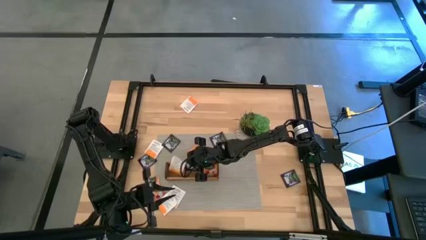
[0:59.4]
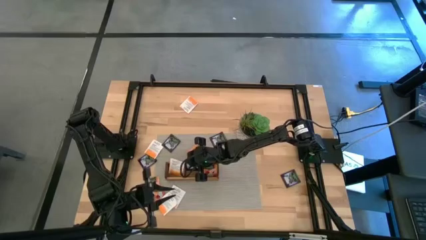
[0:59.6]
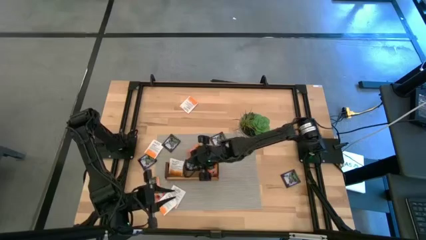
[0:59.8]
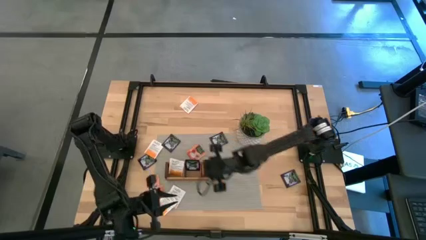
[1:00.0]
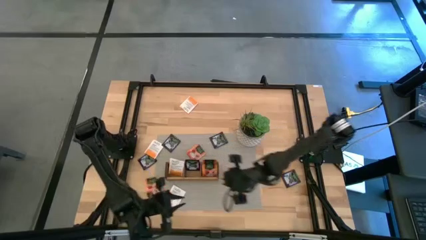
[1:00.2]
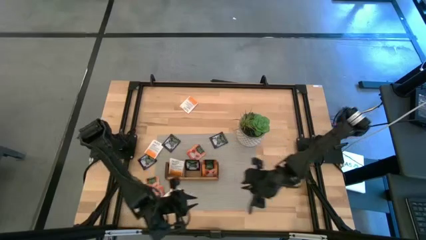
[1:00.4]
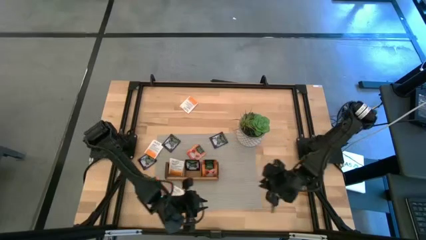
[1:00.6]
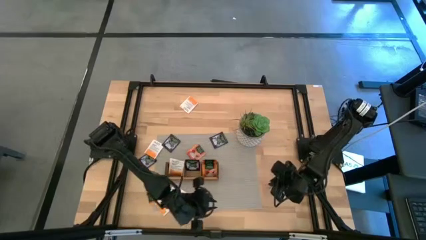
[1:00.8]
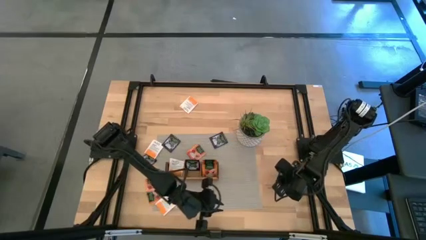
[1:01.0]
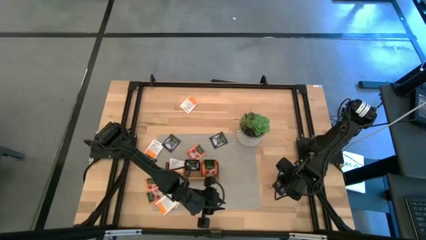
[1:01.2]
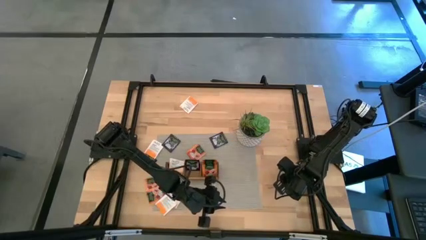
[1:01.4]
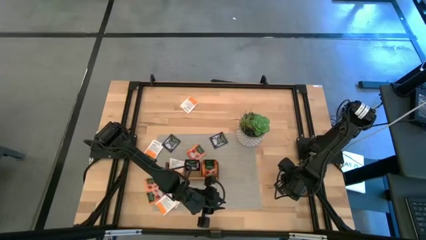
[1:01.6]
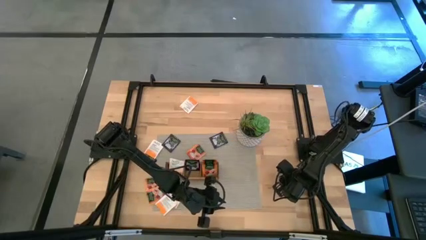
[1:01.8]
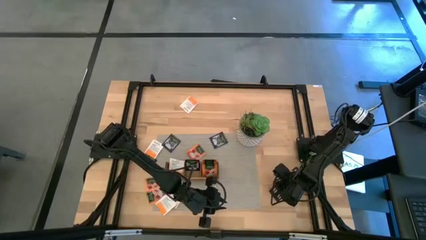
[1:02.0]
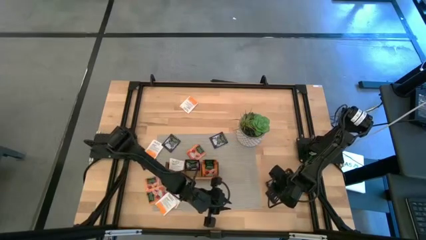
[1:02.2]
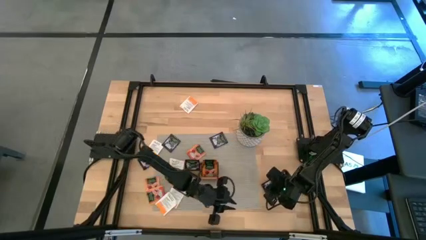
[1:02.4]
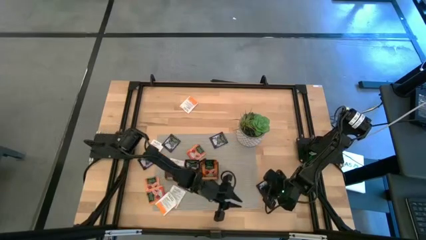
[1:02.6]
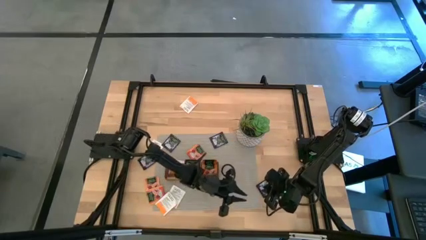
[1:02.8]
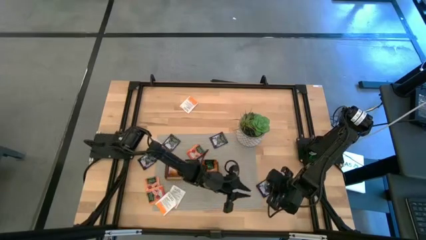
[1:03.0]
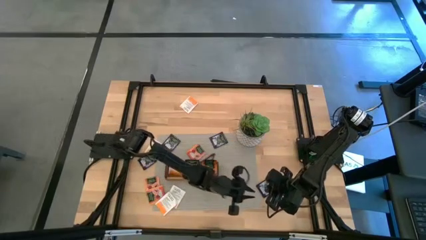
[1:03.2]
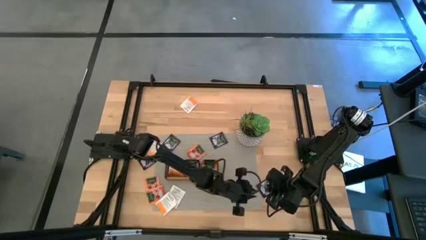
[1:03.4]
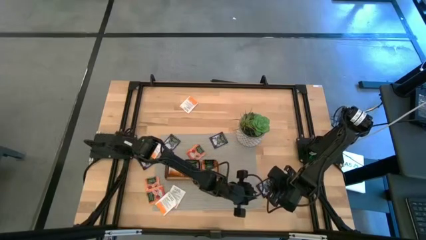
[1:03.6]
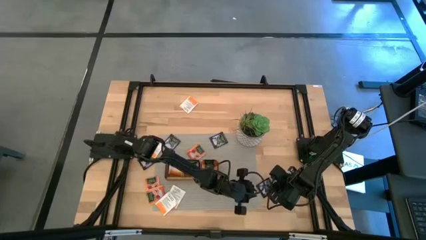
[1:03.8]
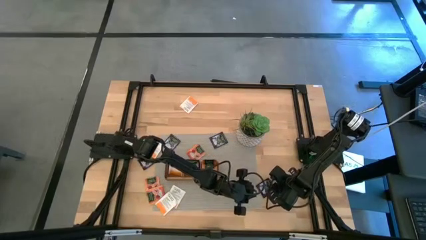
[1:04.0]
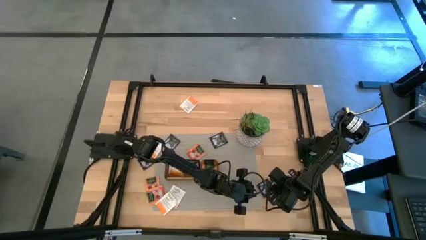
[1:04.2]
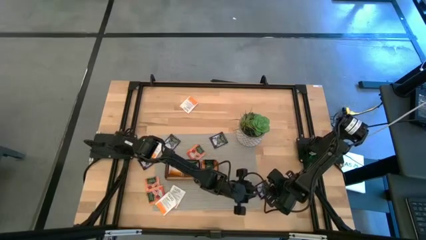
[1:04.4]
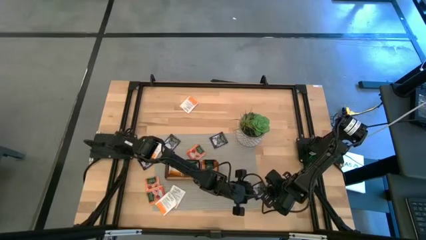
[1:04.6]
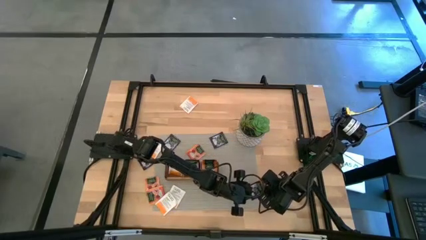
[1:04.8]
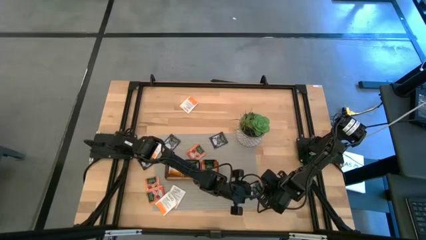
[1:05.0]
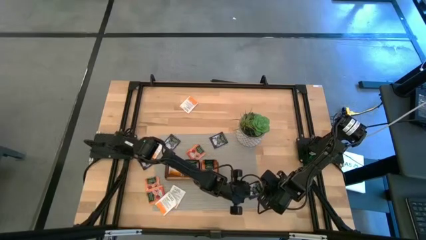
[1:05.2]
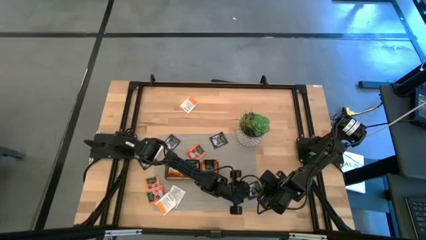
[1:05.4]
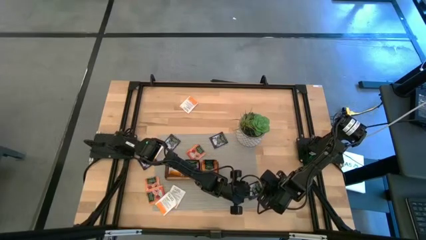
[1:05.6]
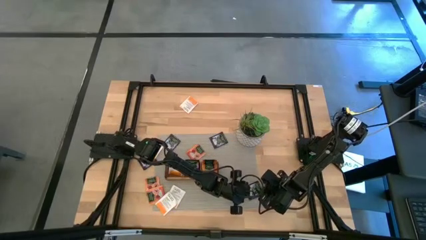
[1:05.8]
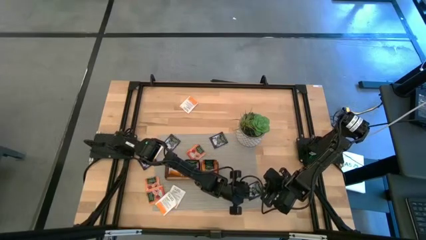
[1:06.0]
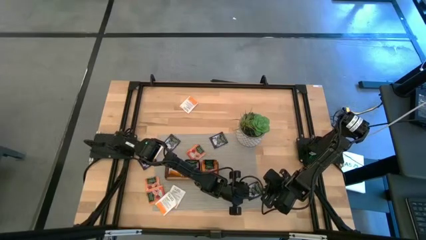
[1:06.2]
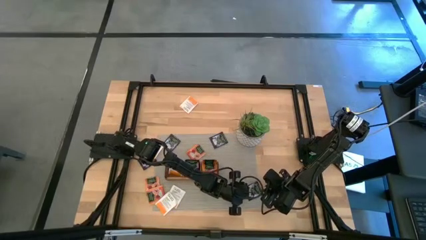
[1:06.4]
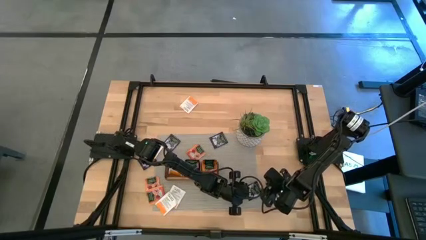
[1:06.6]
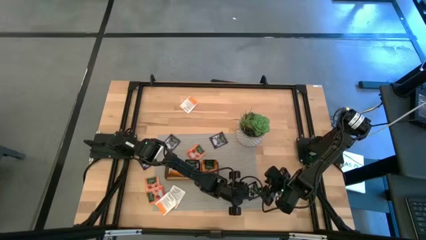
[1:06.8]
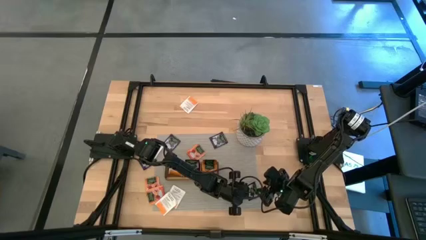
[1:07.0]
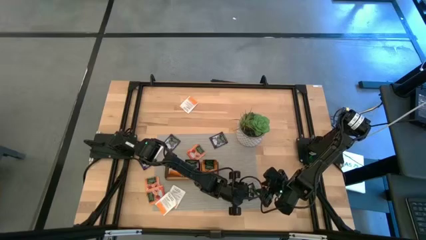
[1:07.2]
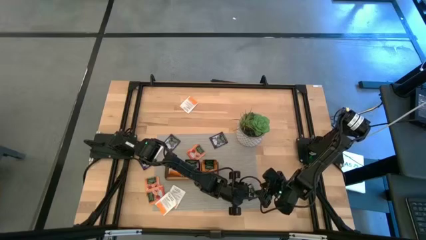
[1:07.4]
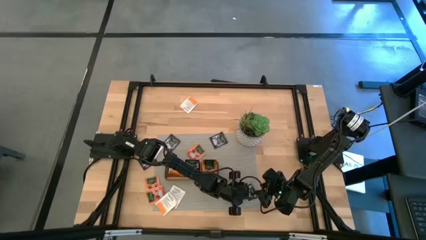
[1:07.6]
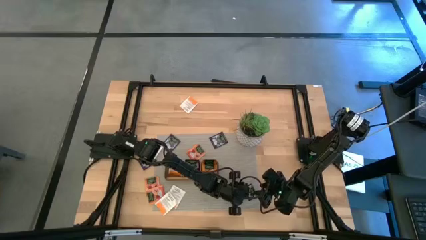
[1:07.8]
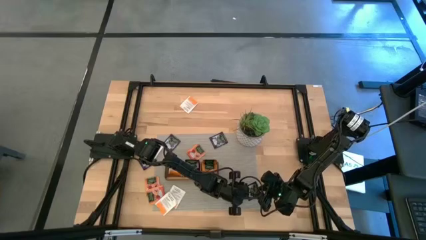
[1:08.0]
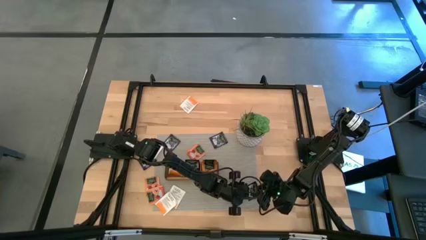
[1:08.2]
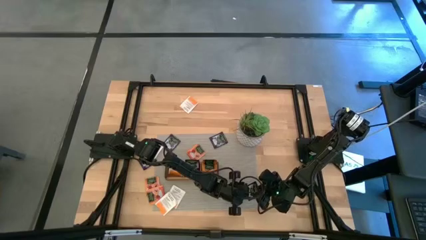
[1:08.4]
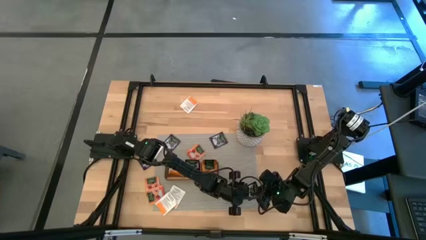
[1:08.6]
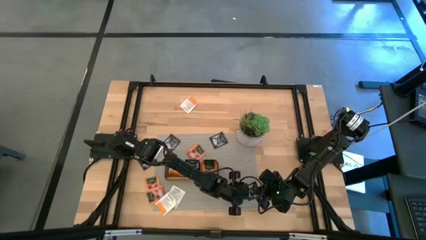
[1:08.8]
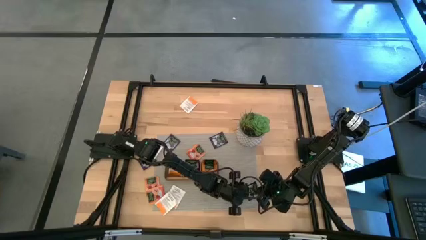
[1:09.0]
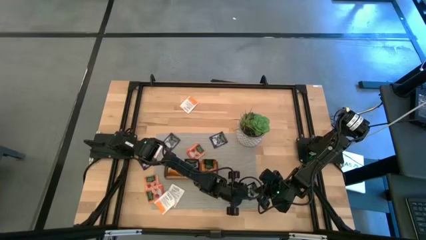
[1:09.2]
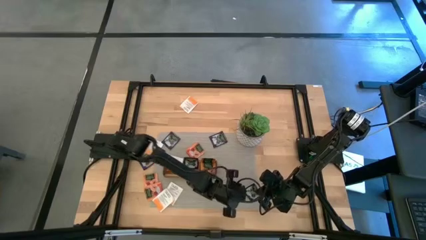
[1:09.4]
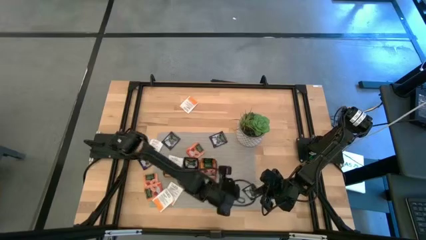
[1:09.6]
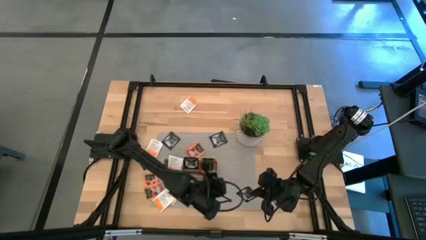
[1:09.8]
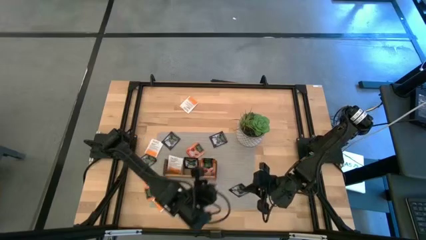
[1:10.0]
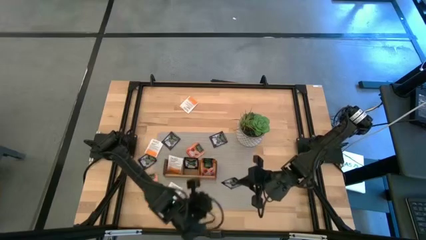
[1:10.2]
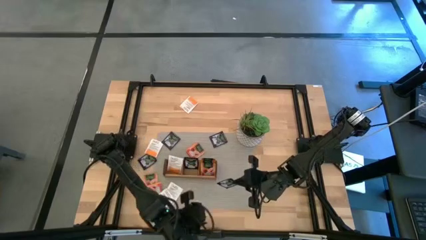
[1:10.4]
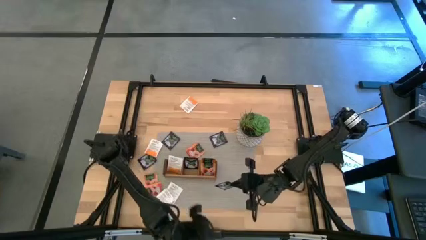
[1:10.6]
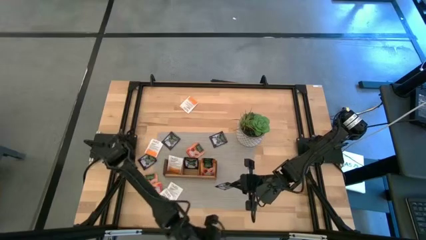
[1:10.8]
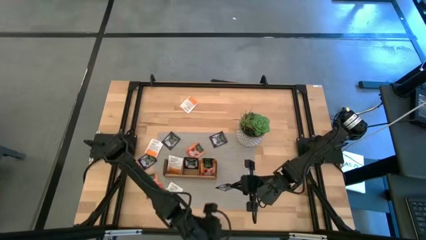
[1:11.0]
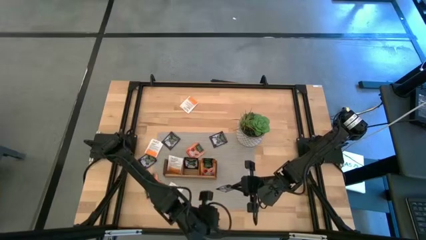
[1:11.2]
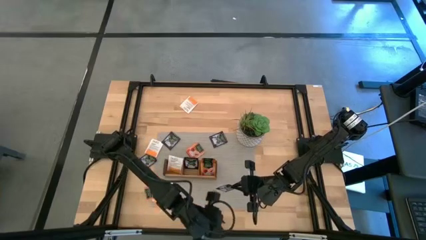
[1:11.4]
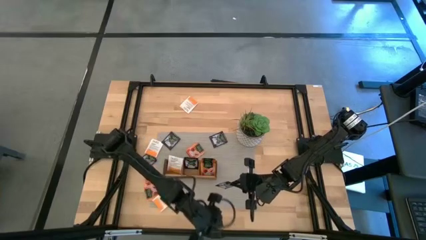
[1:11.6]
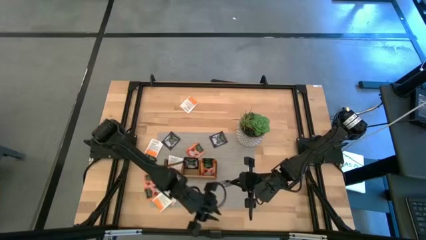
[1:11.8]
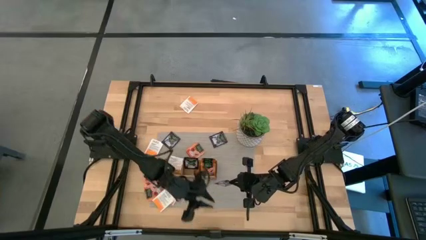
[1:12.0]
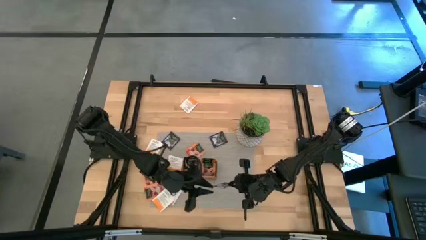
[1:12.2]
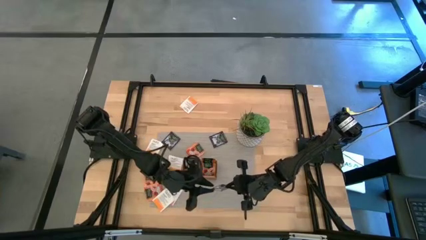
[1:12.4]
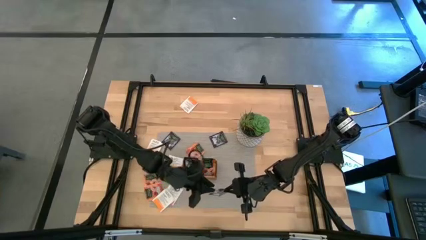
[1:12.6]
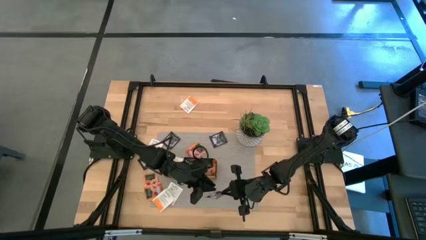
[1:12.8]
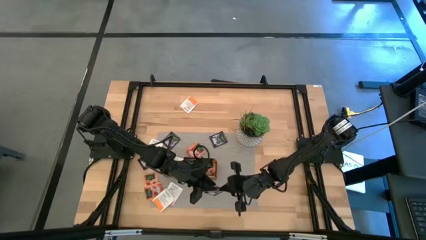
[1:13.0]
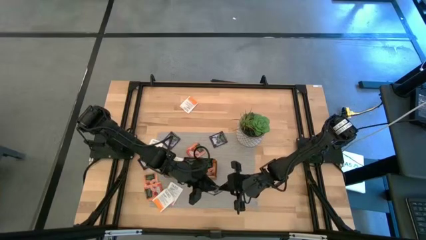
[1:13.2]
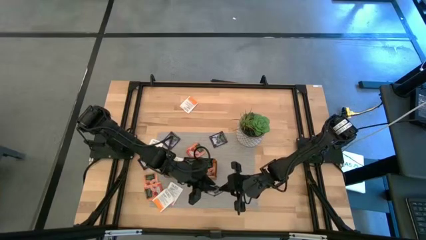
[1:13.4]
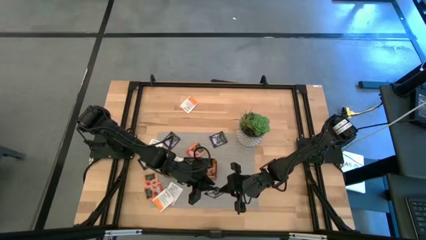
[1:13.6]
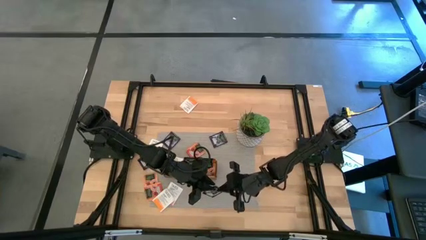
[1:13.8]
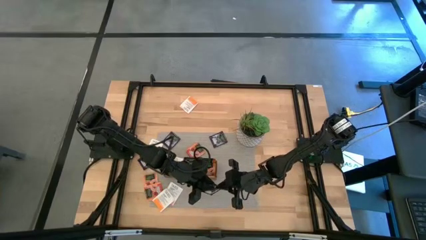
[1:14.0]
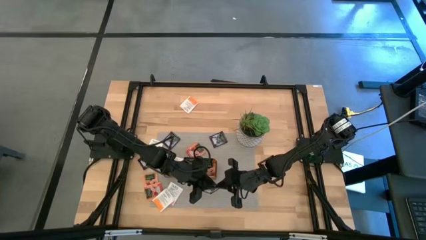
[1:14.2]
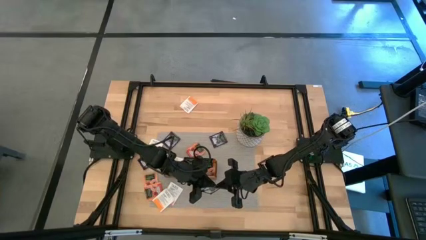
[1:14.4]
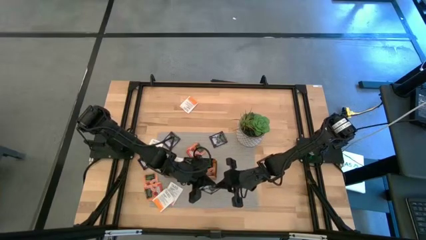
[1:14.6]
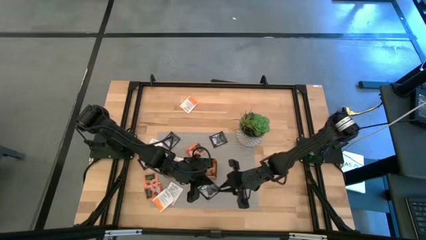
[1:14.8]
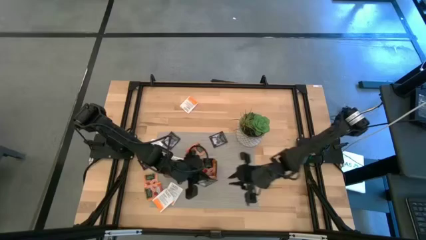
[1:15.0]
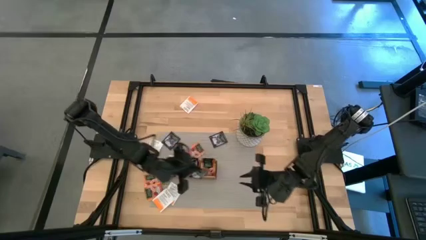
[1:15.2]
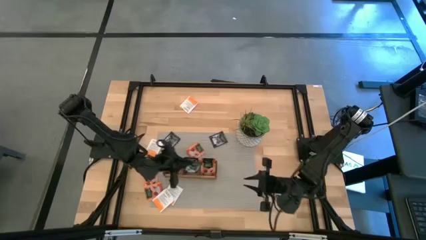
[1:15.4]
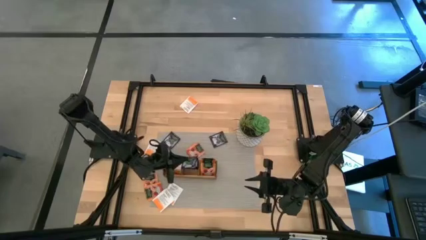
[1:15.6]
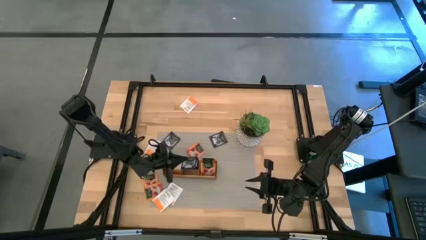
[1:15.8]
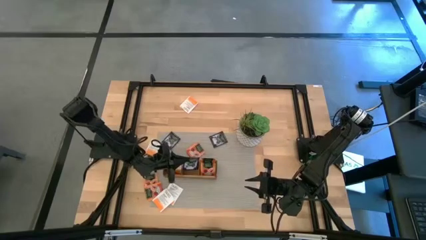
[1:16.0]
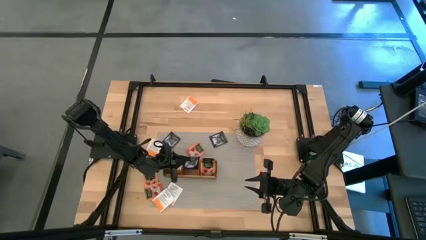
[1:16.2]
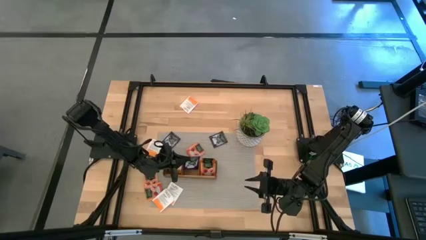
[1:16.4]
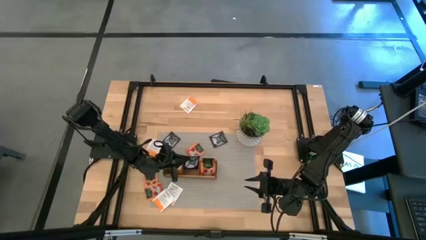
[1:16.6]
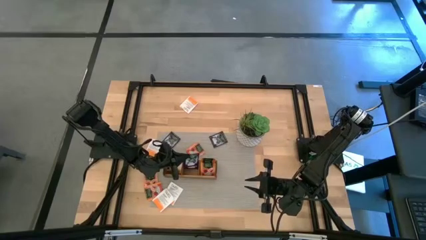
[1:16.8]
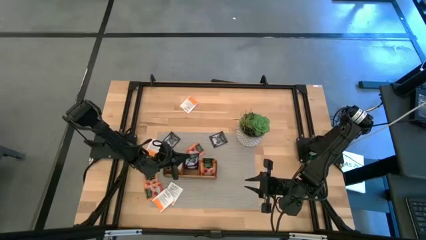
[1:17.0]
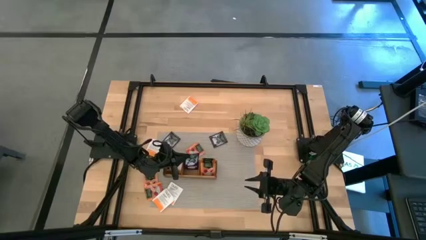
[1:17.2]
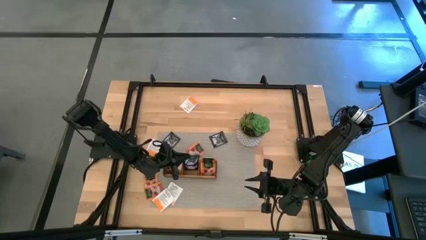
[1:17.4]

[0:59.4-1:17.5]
Task: Pick & Place Tea
Put the violet tea bag into the middle section of the wooden organizer
